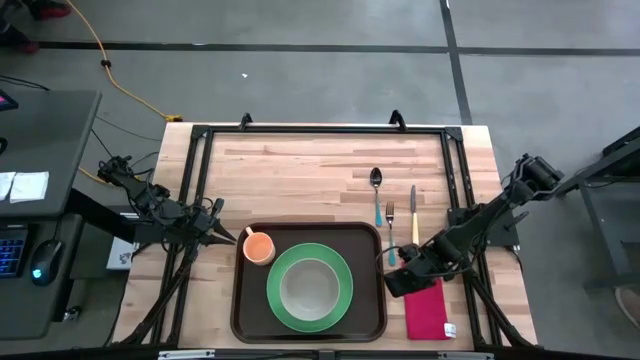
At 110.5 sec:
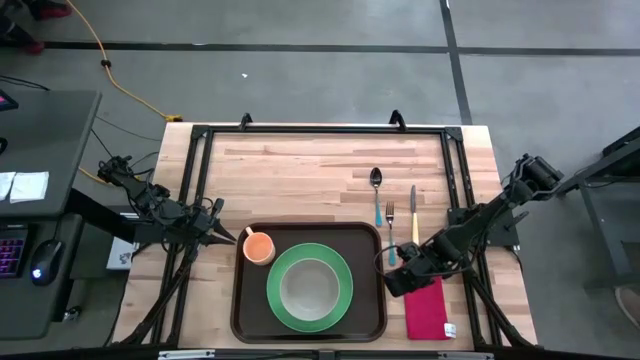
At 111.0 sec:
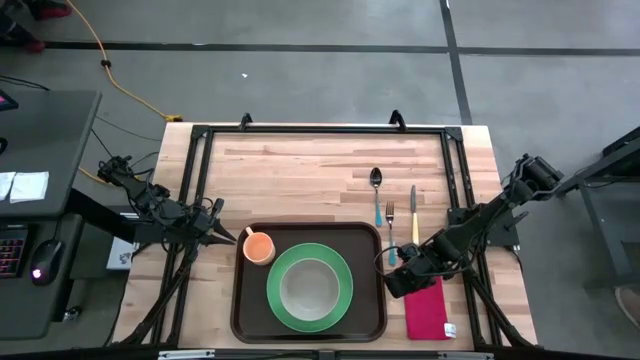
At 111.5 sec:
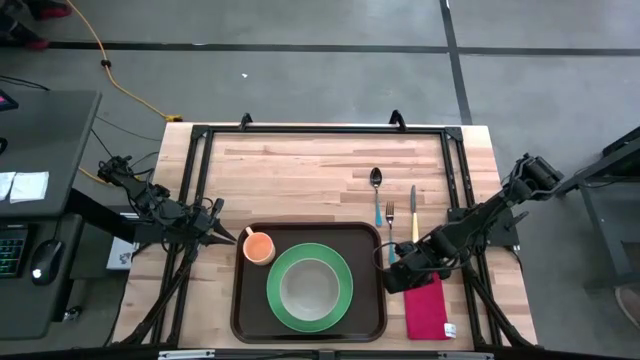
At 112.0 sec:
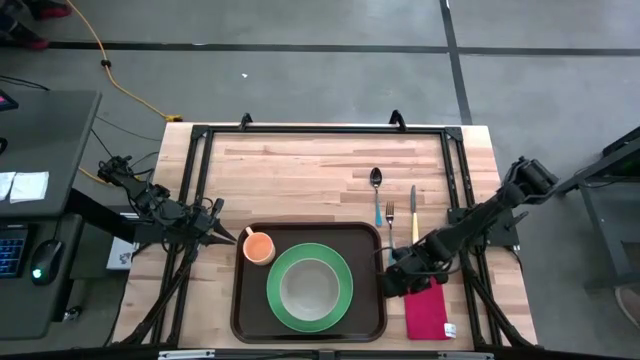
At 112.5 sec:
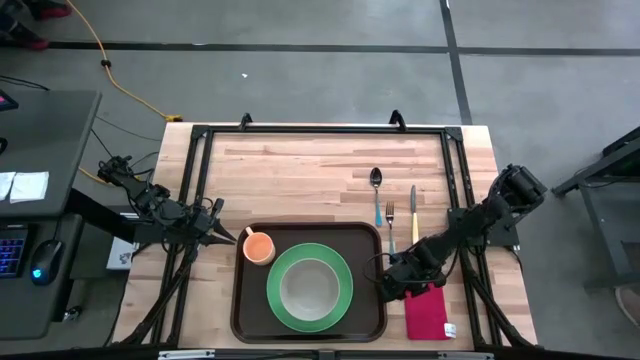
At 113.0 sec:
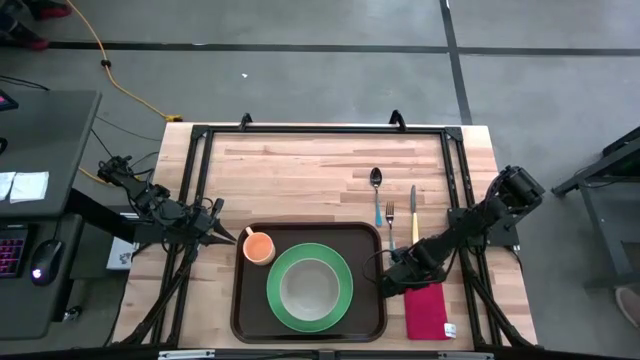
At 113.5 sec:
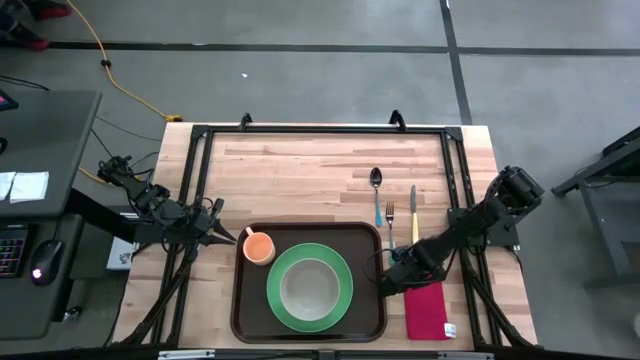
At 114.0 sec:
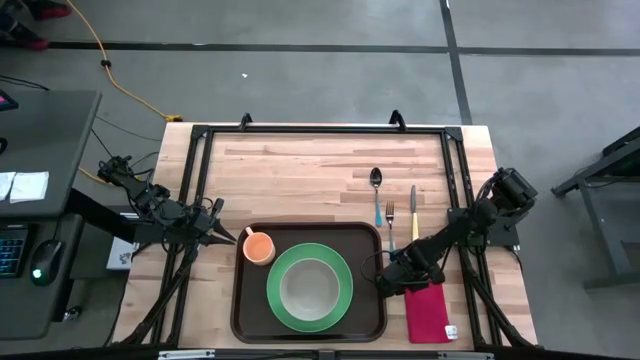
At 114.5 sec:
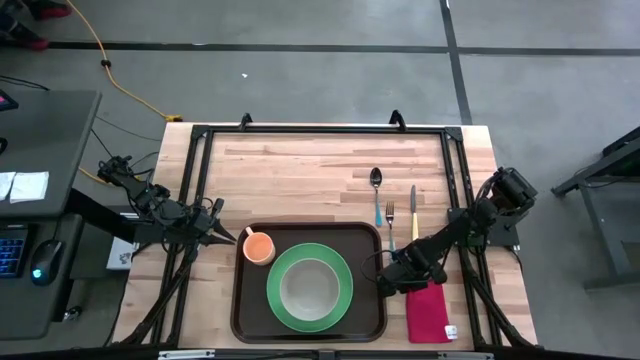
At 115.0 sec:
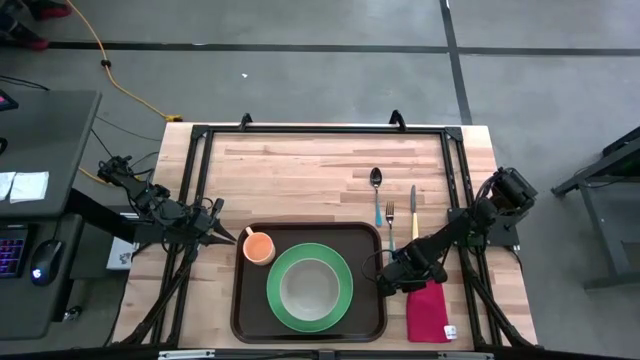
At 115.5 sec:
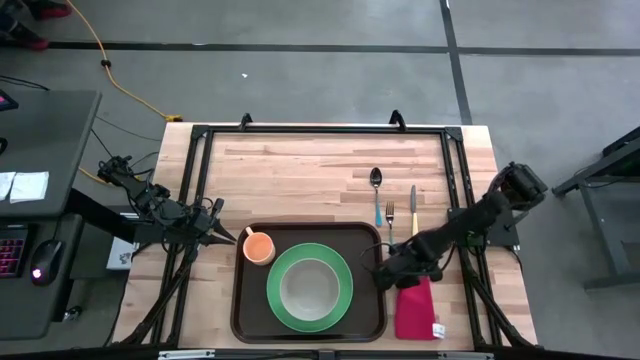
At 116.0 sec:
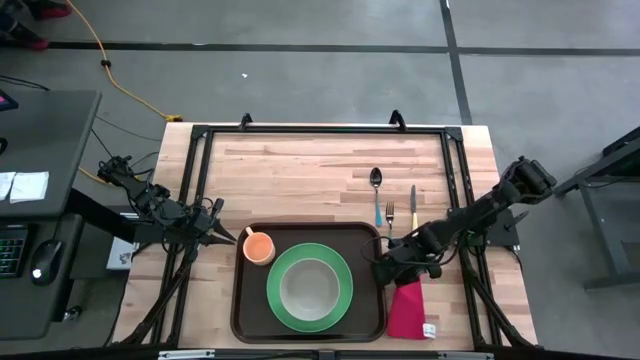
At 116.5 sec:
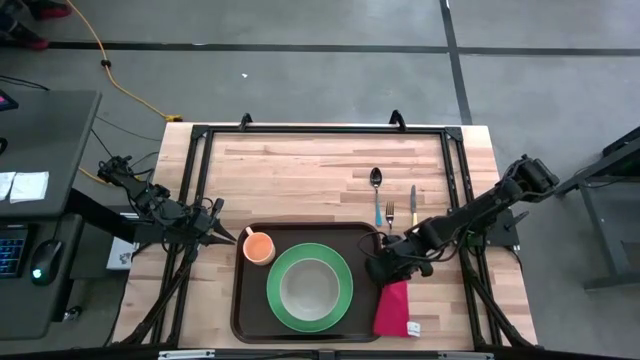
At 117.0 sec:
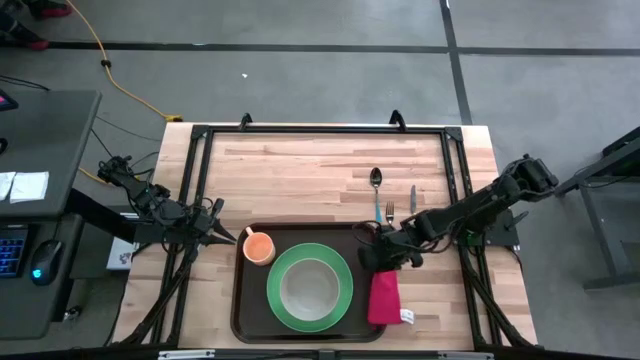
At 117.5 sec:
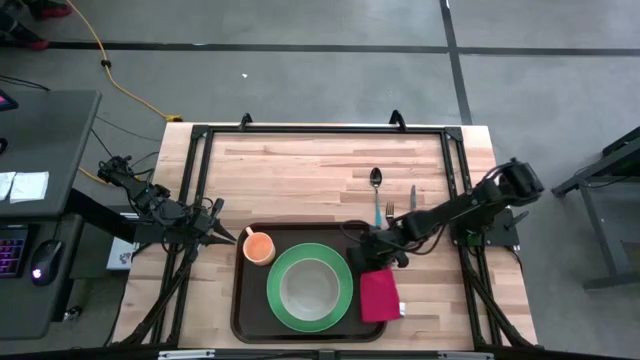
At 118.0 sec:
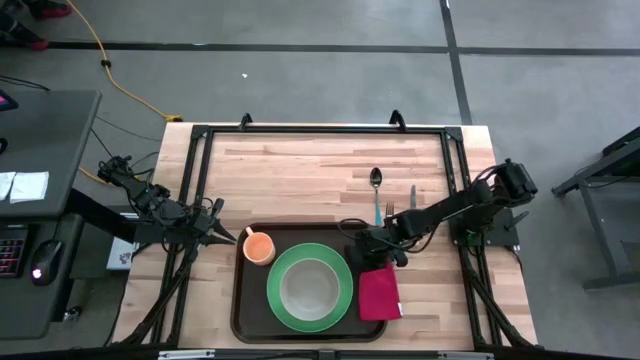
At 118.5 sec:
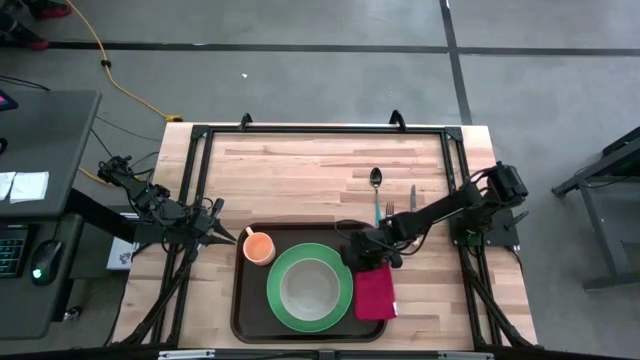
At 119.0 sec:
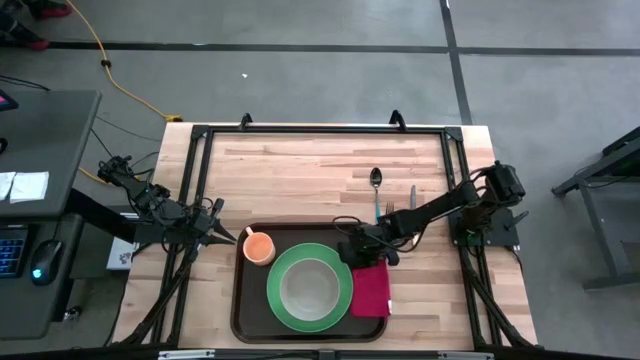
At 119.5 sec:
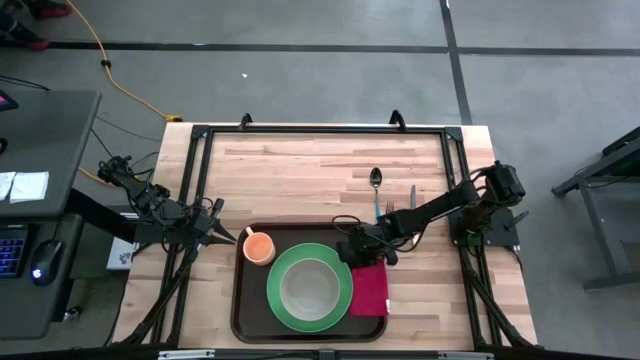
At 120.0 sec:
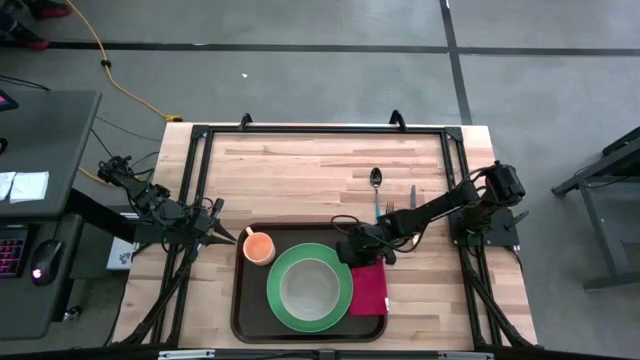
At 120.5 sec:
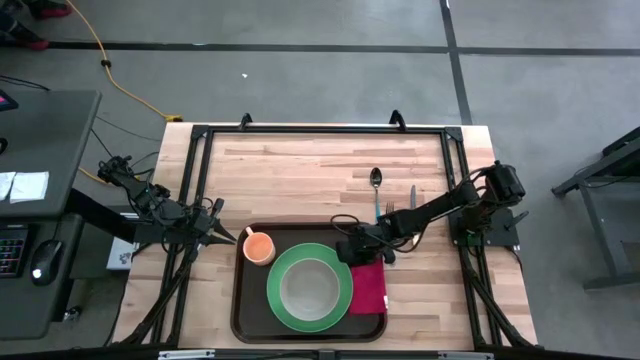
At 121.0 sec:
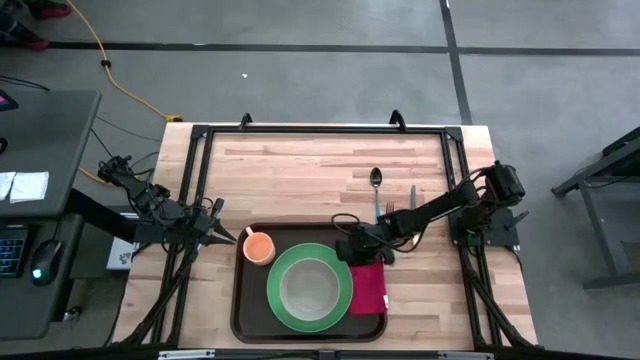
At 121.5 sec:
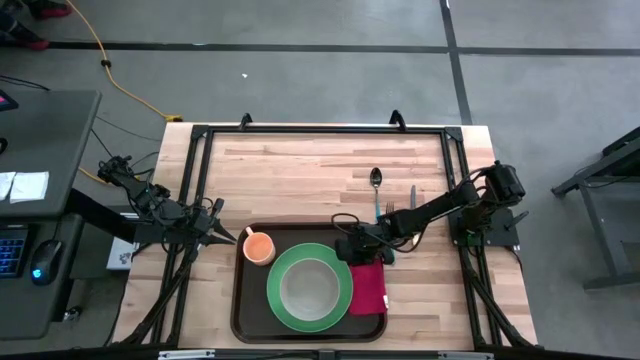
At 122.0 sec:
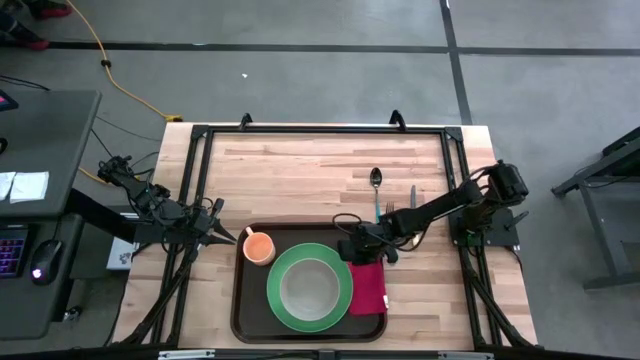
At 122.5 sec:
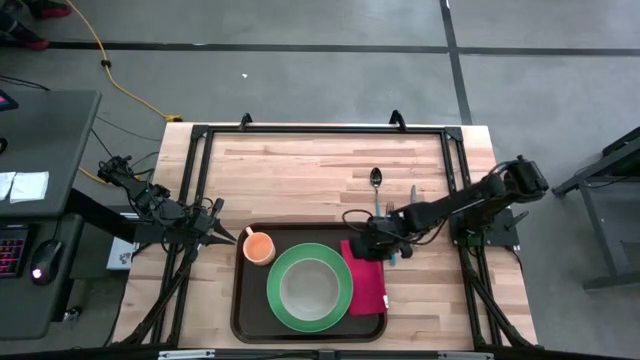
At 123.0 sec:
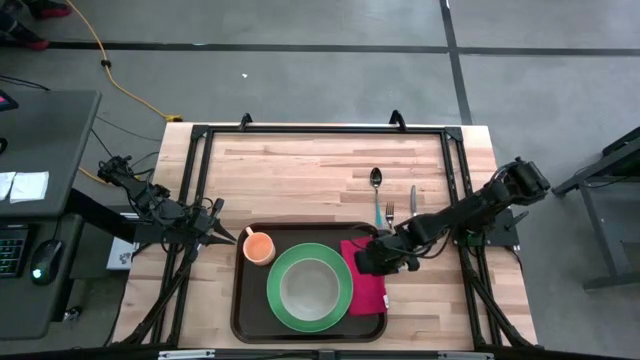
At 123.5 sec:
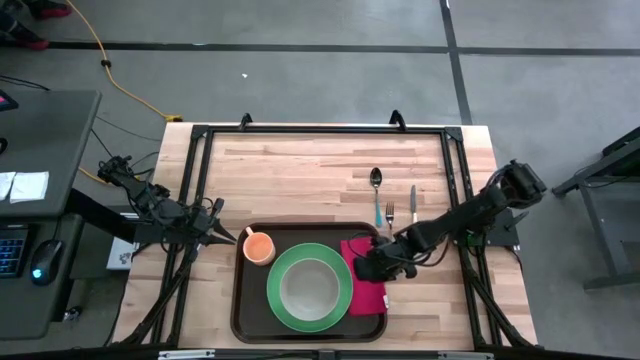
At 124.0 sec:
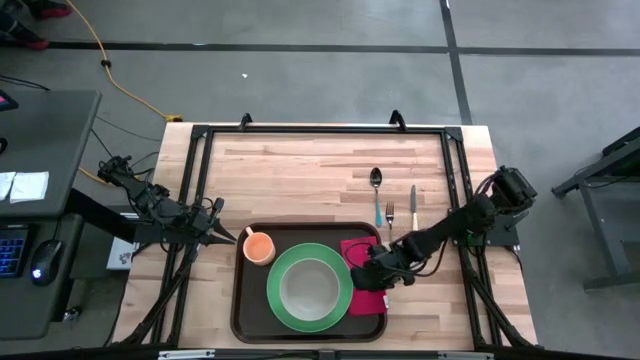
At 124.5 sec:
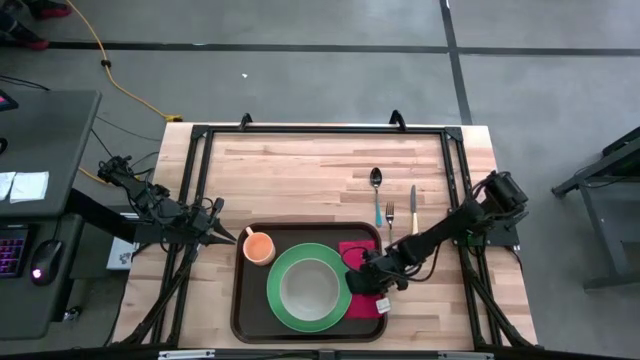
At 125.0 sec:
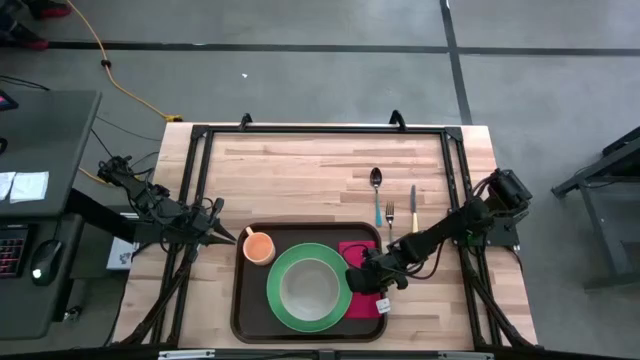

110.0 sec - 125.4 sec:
Task: Set up tray
Put the red table napkin to the right of the green plate on the brown serving tray

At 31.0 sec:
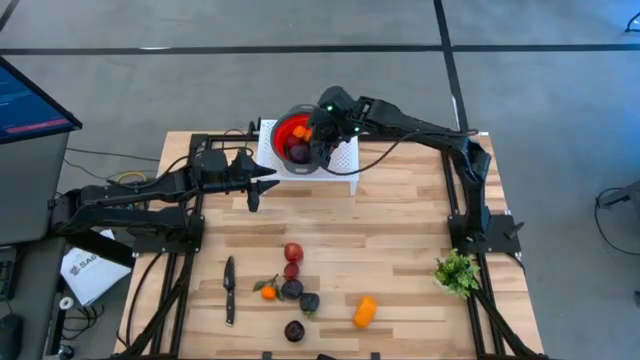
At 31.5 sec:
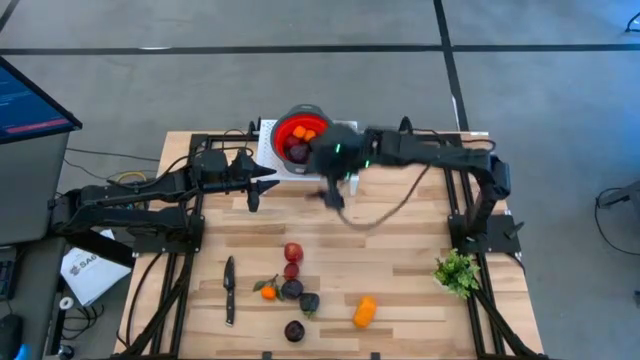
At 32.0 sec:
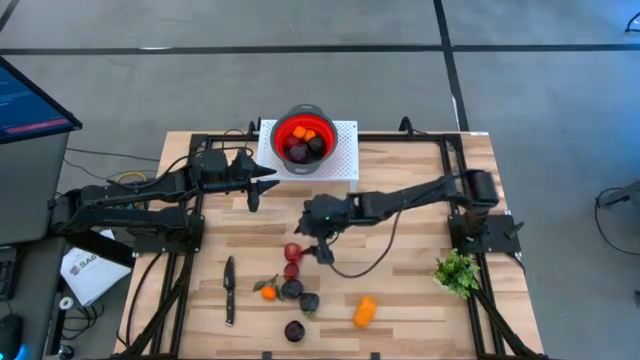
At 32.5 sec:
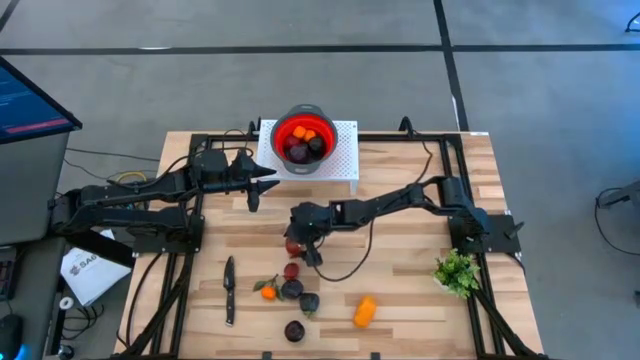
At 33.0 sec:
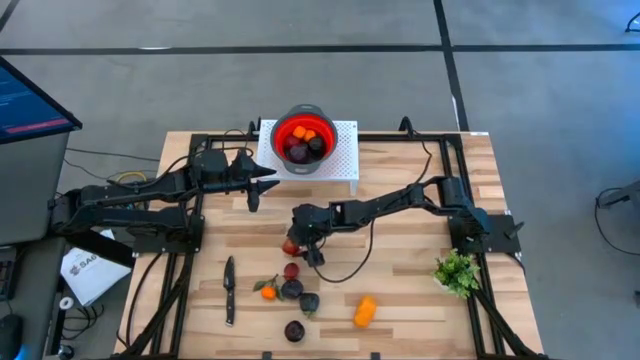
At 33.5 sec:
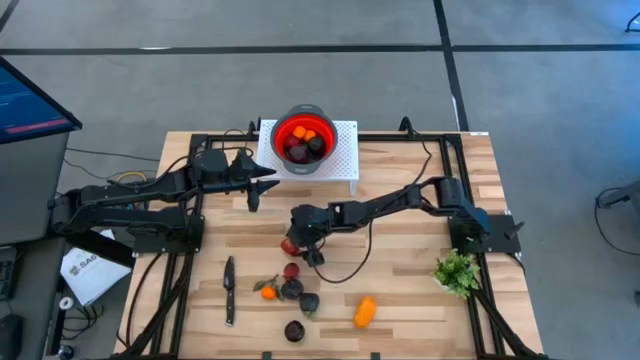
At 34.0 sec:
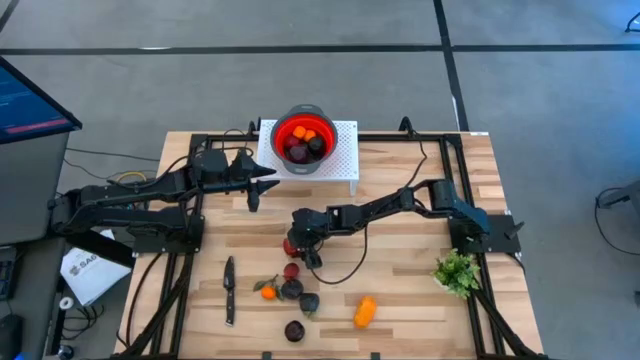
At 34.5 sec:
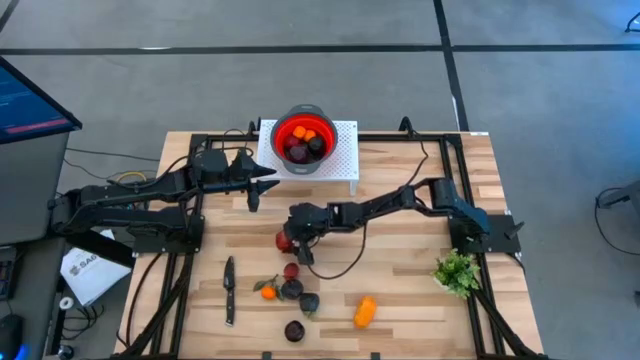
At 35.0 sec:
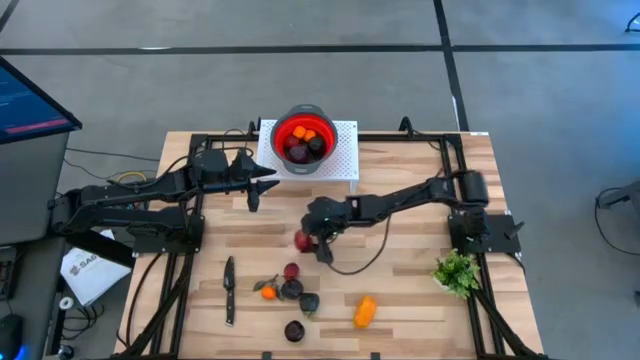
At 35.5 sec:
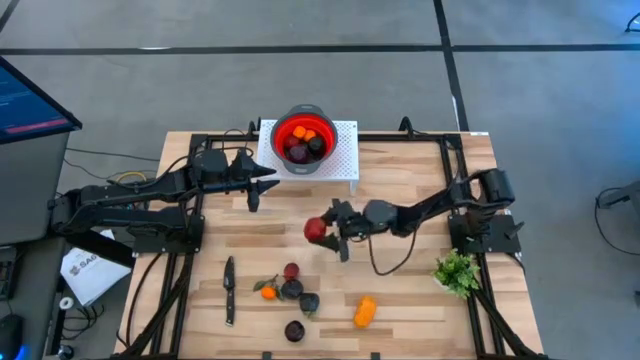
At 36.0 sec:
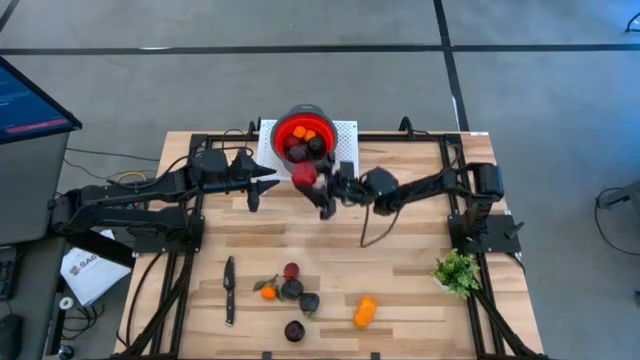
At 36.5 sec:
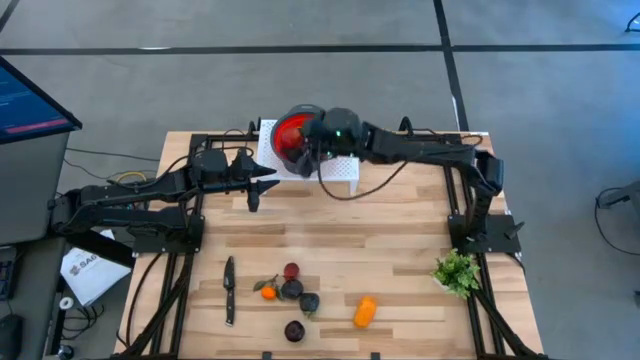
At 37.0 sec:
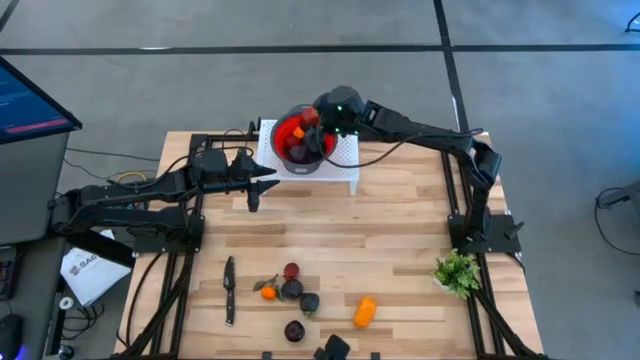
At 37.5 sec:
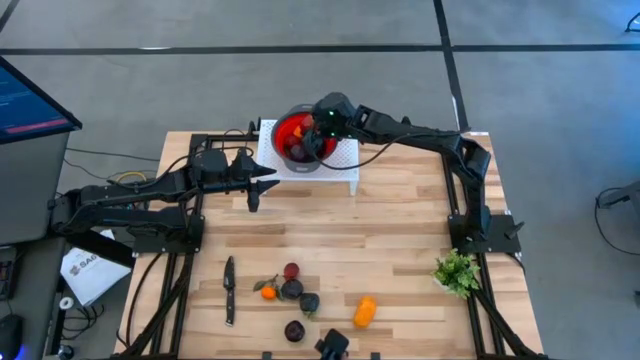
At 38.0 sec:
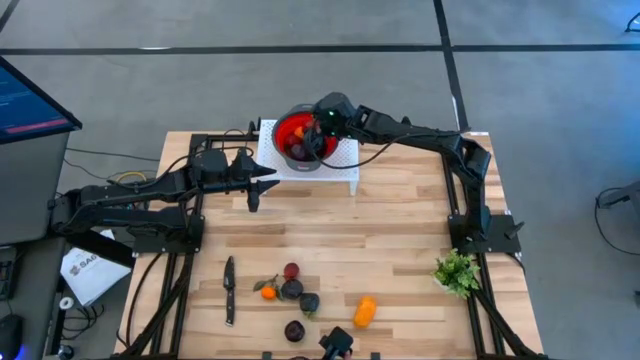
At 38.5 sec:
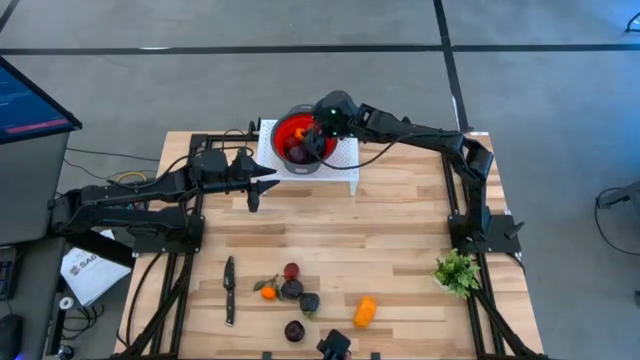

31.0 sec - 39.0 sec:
Task: Pick & Place Fruit
Put the apple into the red strainer bowl
